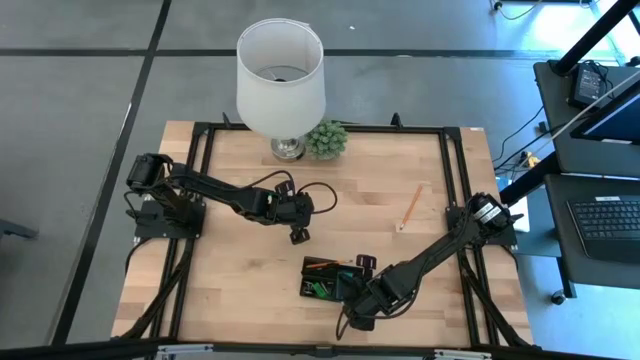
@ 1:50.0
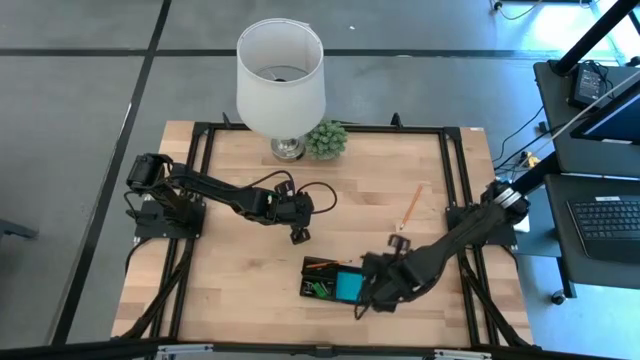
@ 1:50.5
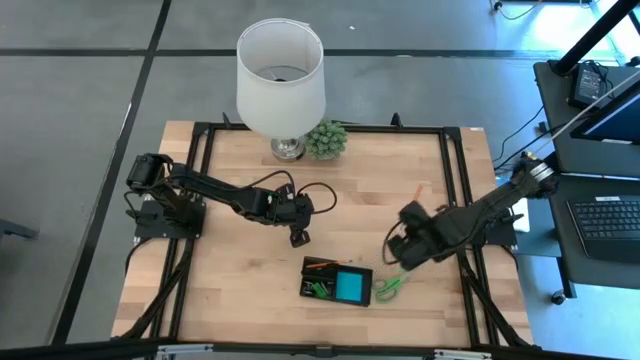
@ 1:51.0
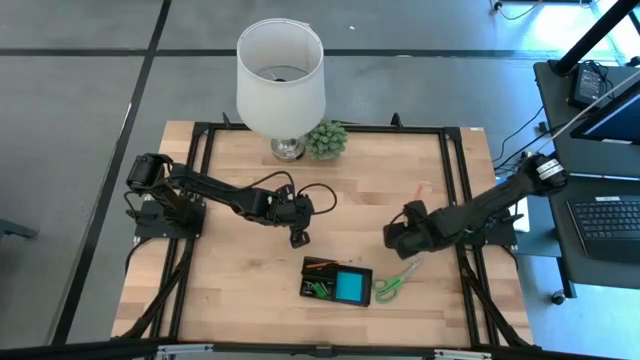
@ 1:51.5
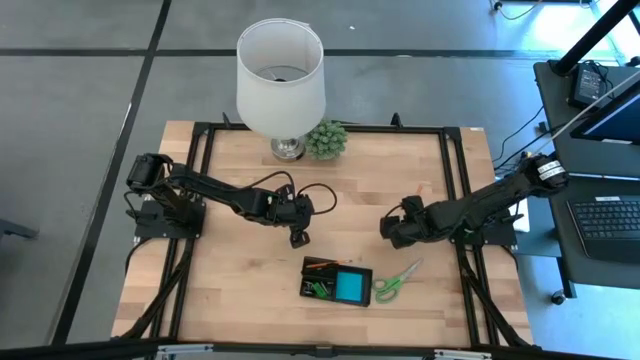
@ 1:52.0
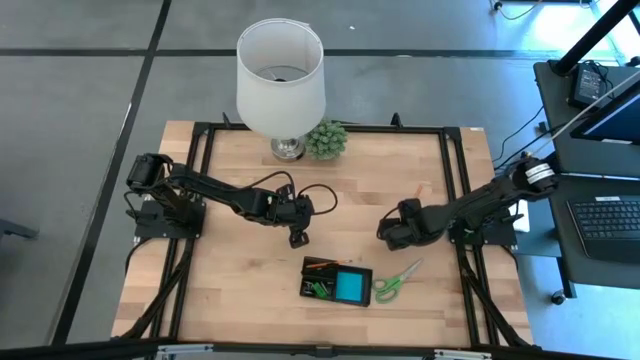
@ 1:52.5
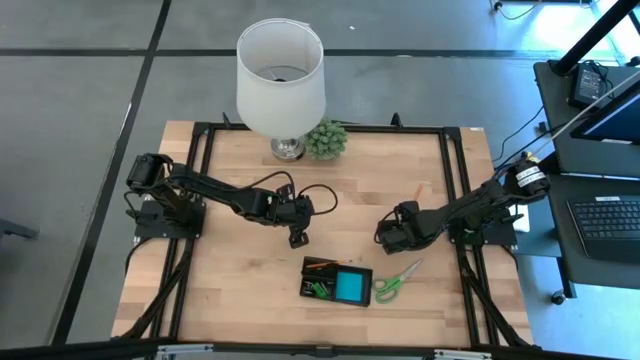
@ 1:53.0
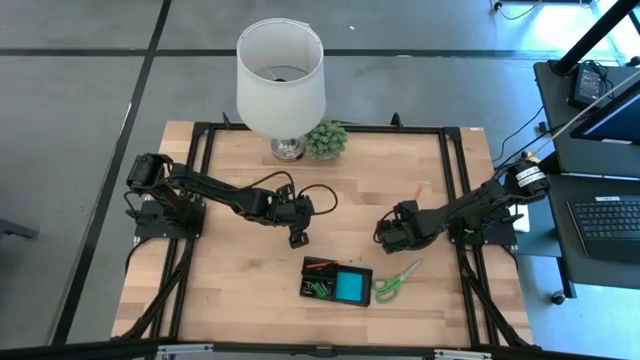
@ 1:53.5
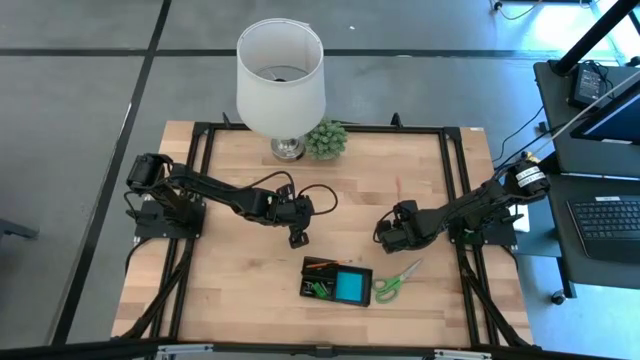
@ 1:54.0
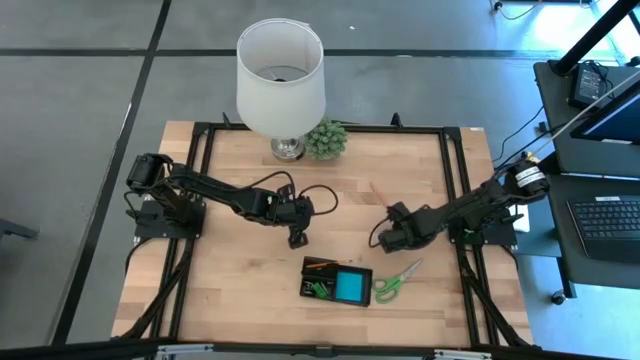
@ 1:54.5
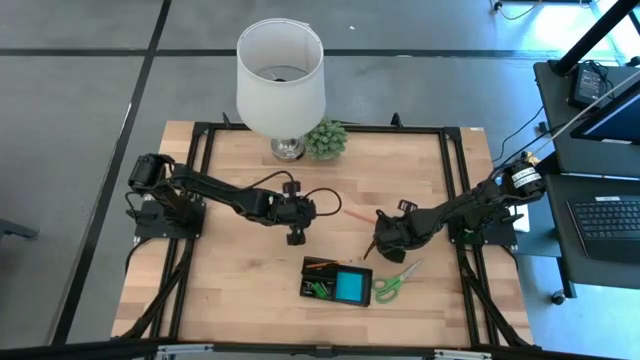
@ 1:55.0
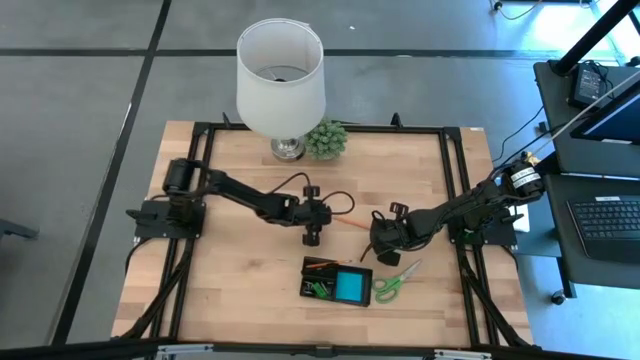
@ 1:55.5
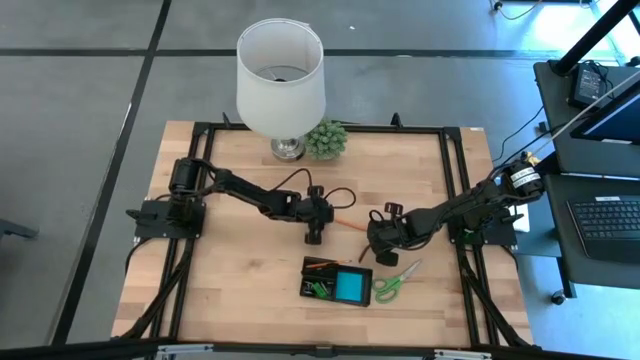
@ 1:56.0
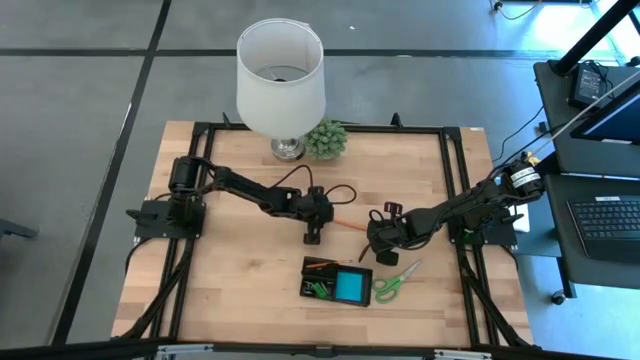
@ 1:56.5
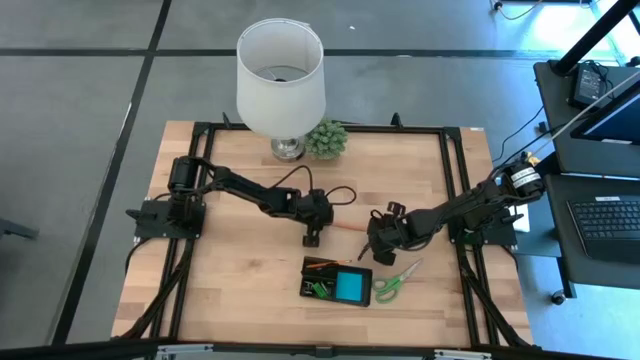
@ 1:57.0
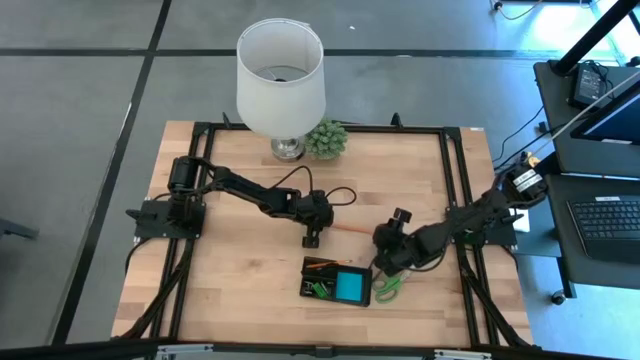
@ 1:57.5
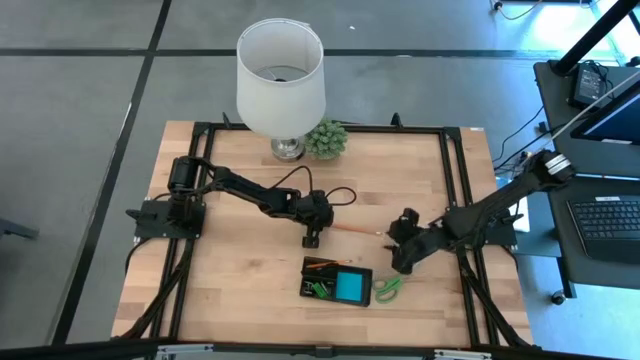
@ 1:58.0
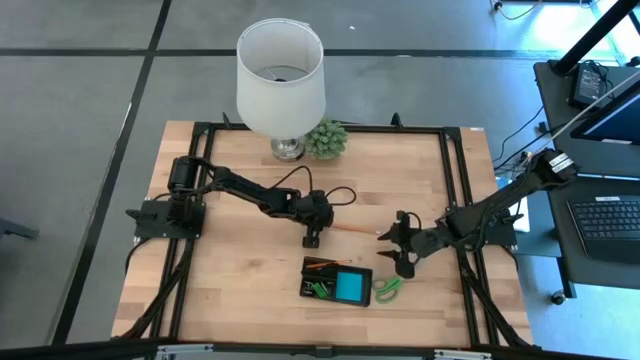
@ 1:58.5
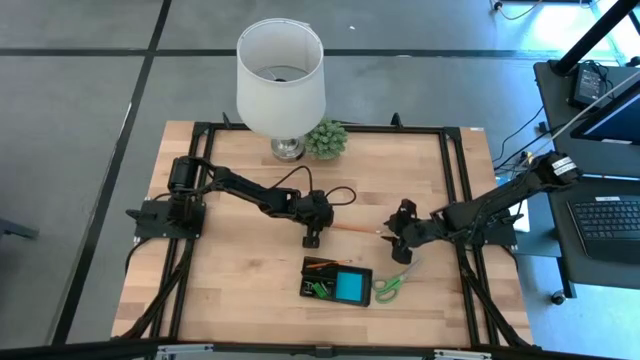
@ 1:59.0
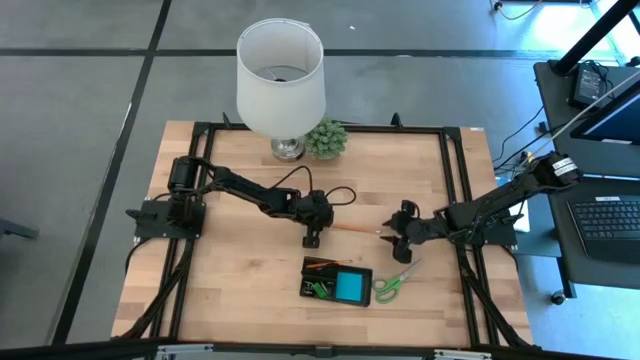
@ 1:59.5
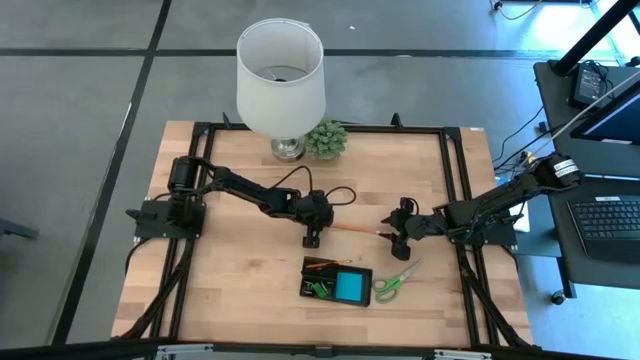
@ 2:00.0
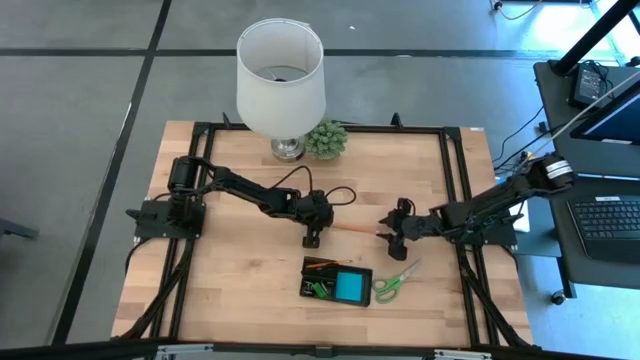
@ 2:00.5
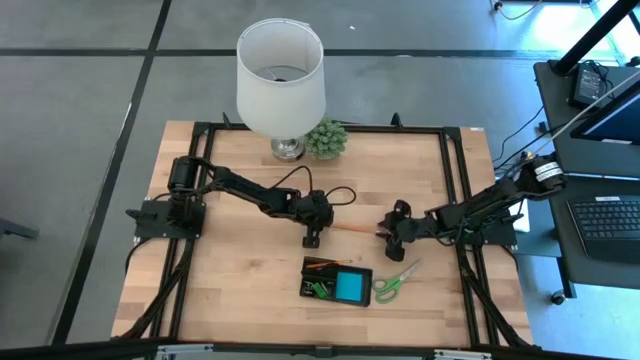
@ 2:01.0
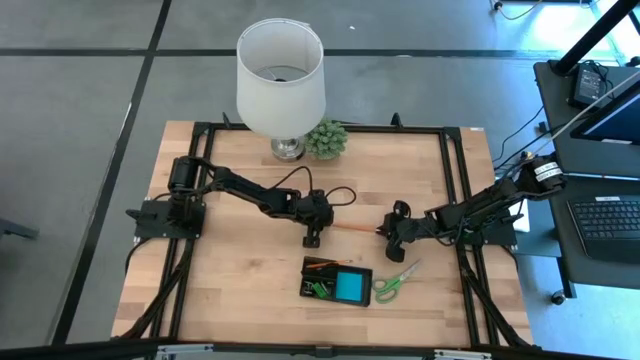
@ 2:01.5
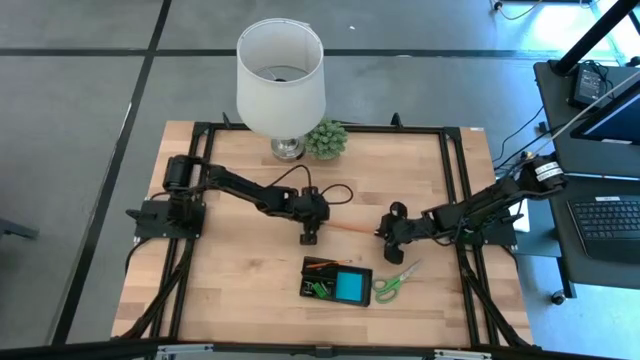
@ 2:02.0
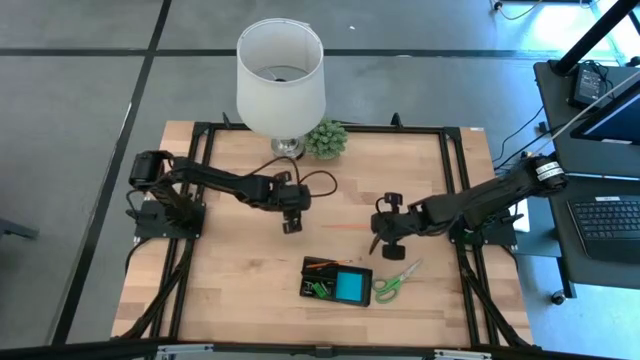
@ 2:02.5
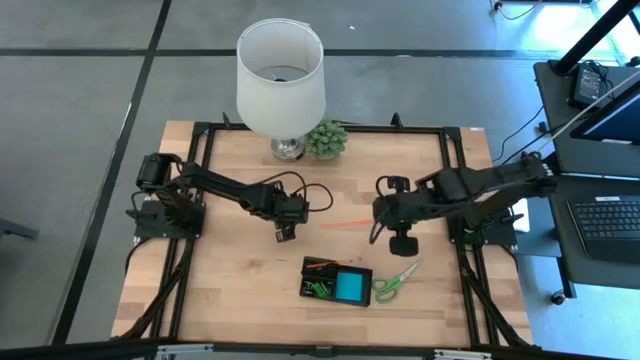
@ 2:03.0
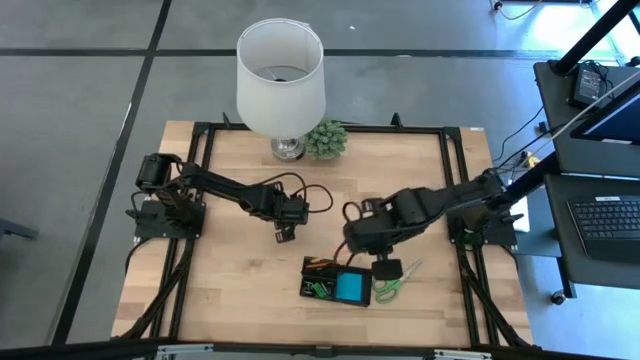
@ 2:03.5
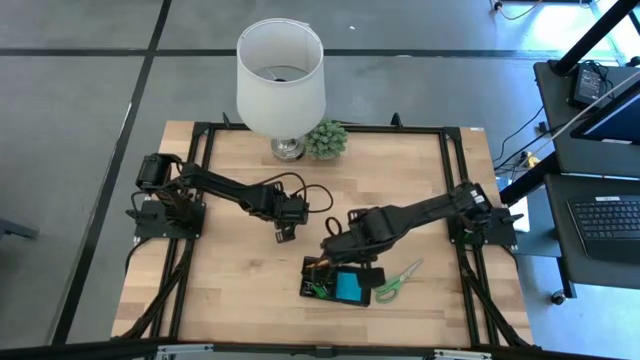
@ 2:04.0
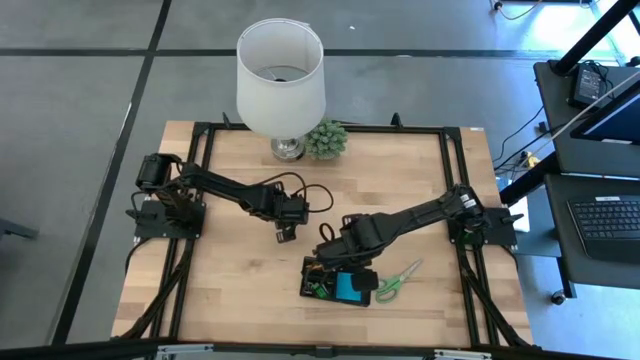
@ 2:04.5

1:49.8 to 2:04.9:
Task: Pick and place office supplies into organizer
Put the orange pencil into the desk organizer

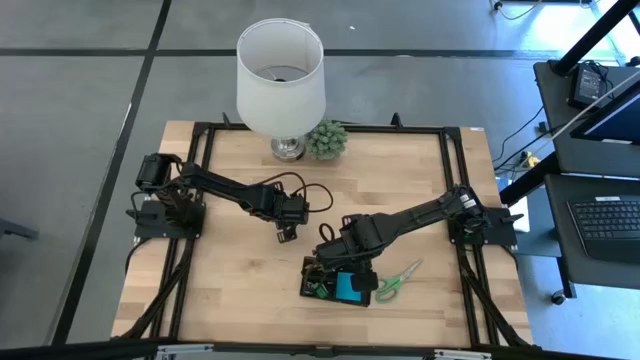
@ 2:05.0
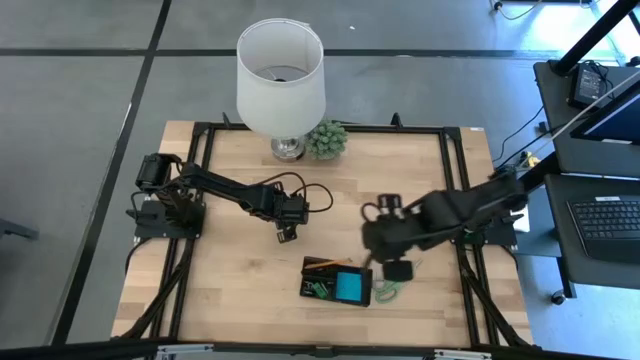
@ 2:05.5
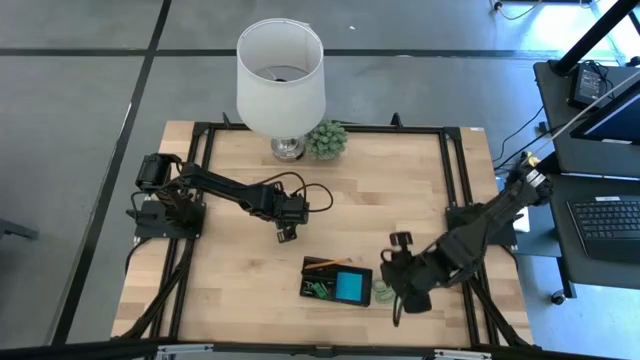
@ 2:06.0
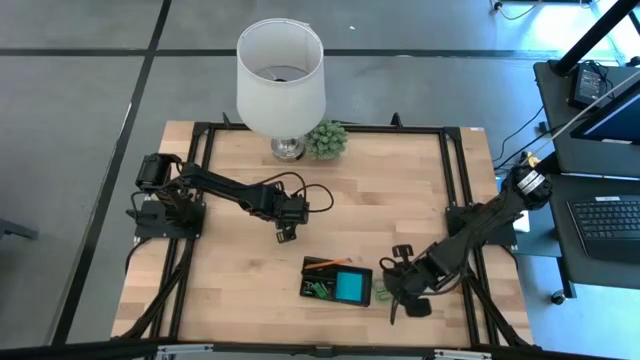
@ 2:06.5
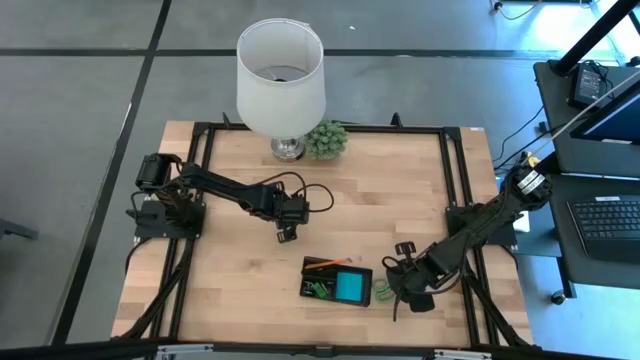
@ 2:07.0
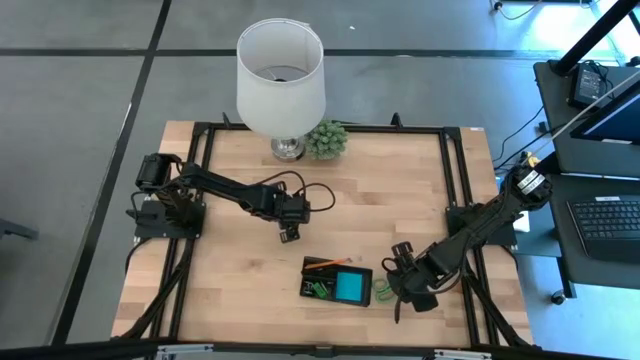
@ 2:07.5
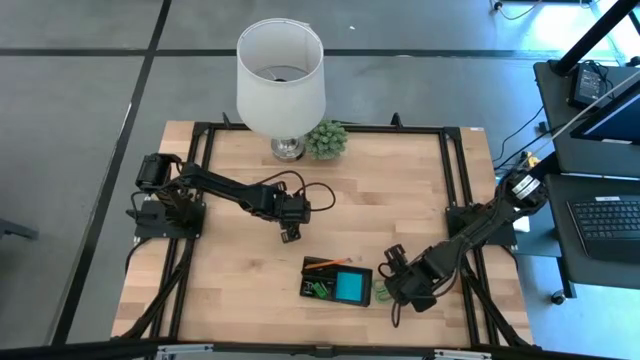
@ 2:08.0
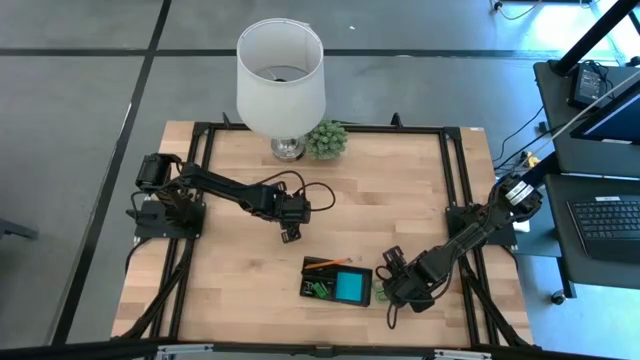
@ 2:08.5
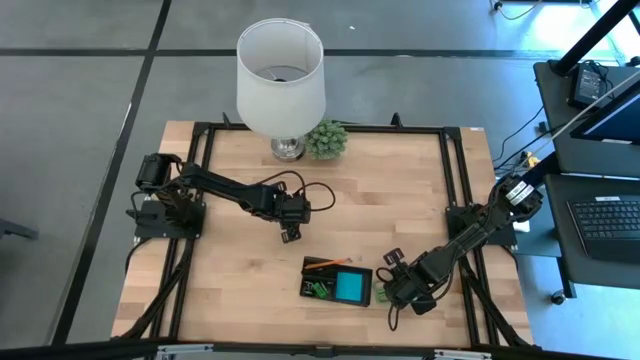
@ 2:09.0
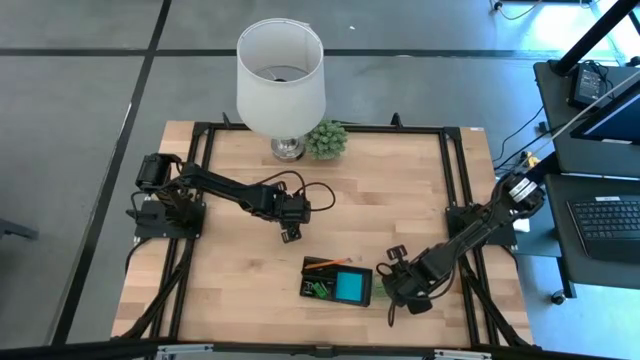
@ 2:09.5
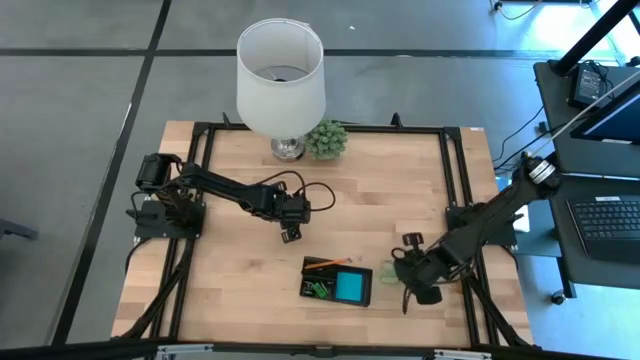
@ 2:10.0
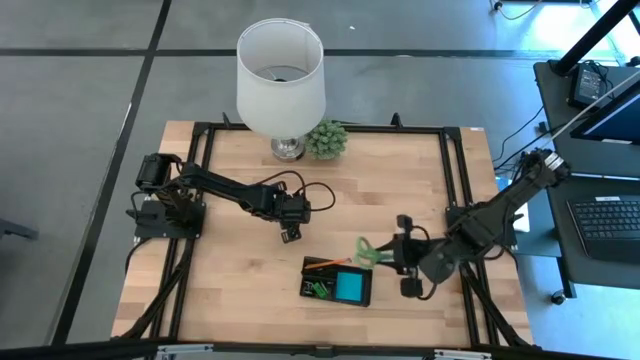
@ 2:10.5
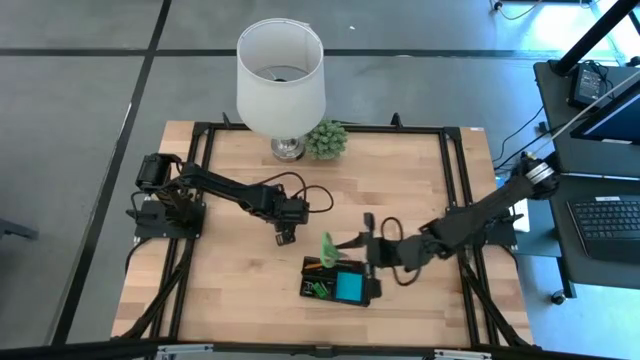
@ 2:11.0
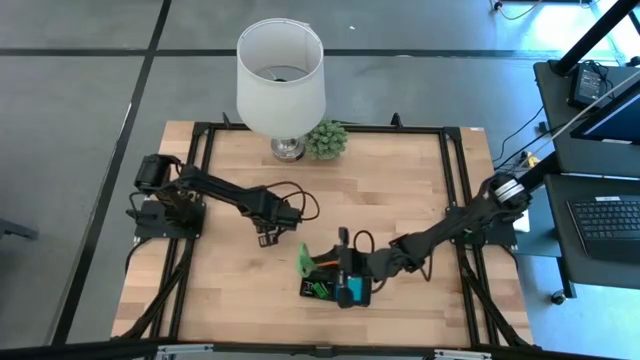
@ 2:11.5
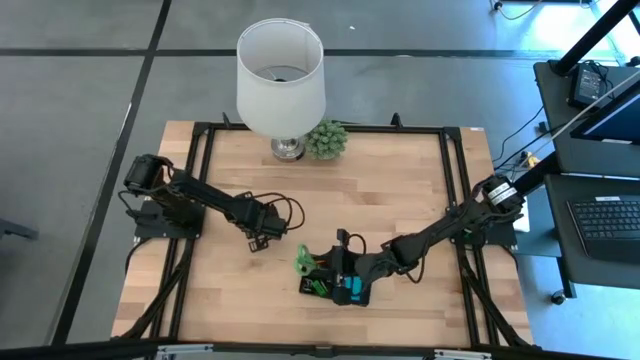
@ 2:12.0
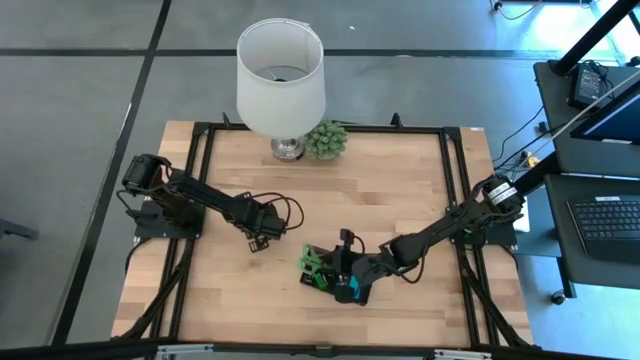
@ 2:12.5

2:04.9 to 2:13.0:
Put the green scissors into the desk organizer
